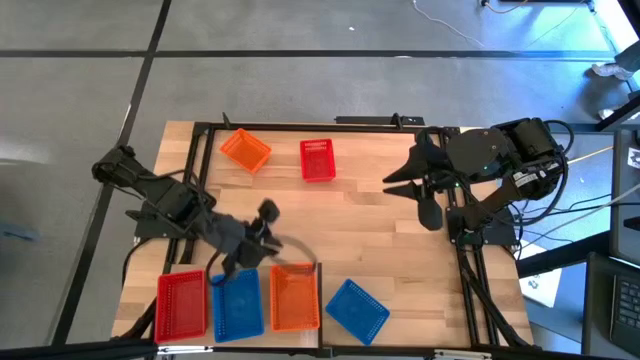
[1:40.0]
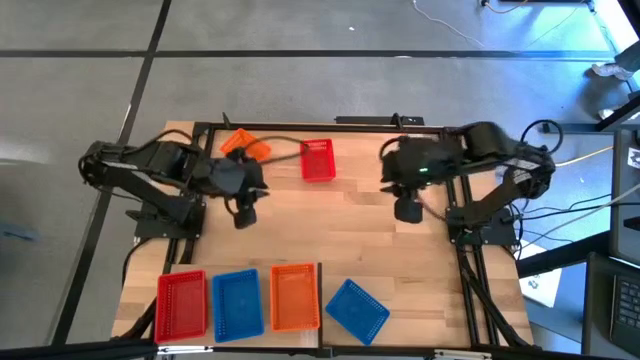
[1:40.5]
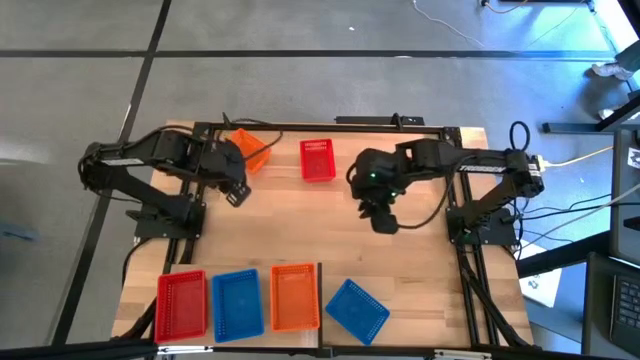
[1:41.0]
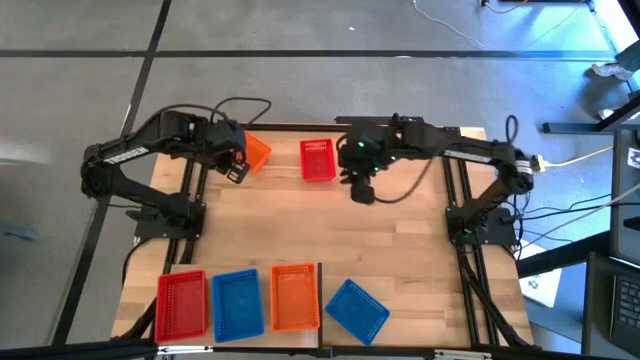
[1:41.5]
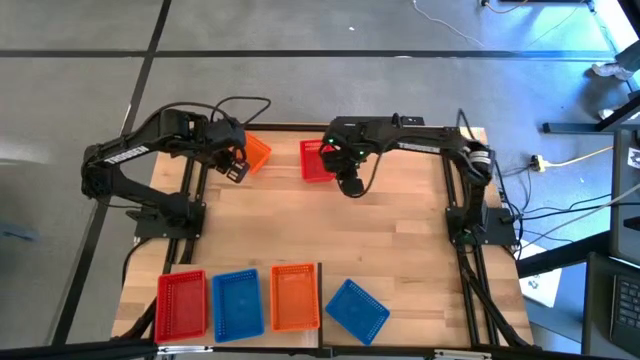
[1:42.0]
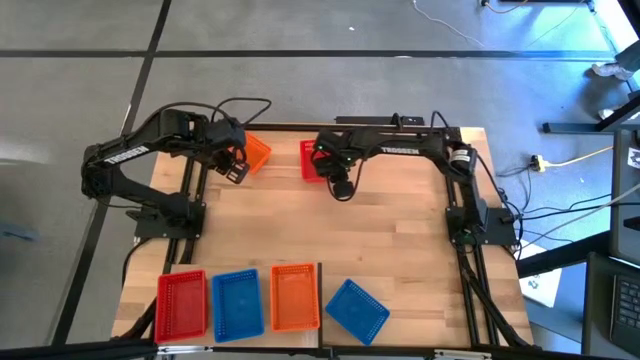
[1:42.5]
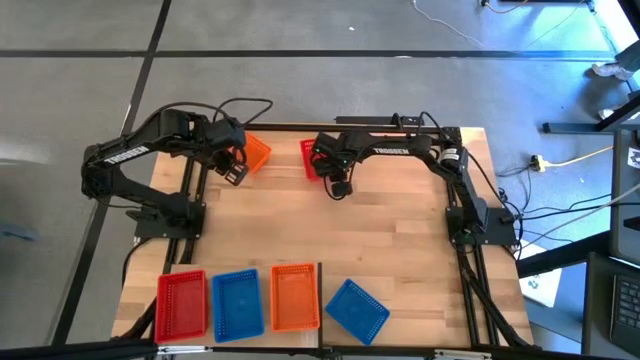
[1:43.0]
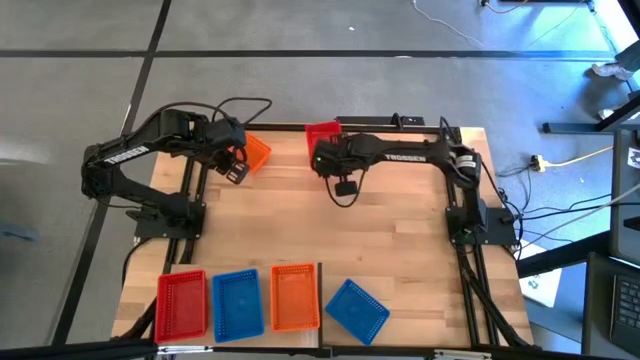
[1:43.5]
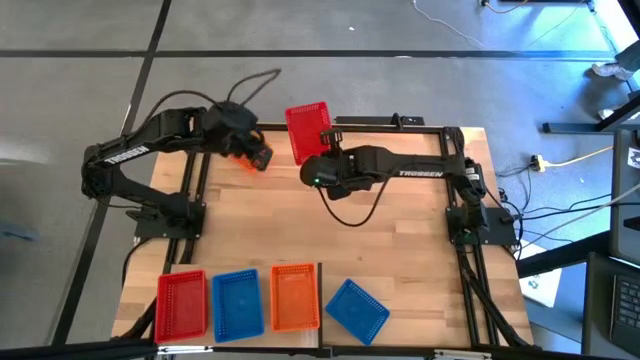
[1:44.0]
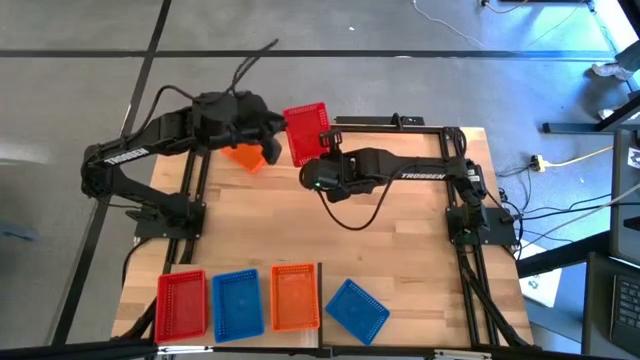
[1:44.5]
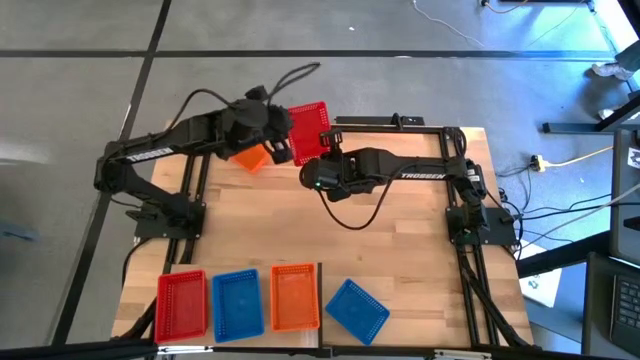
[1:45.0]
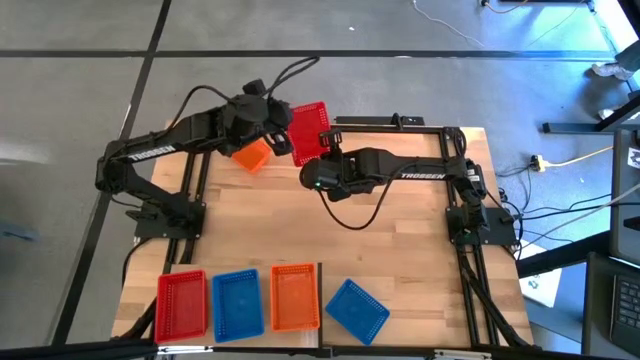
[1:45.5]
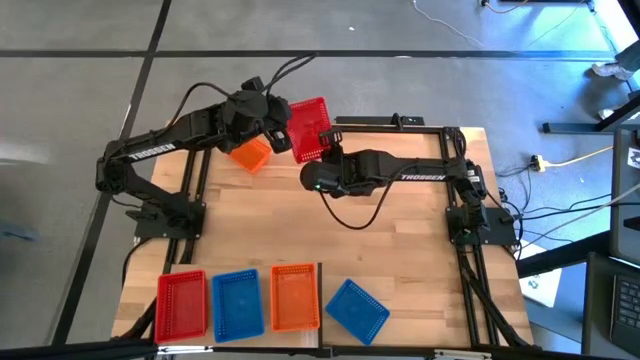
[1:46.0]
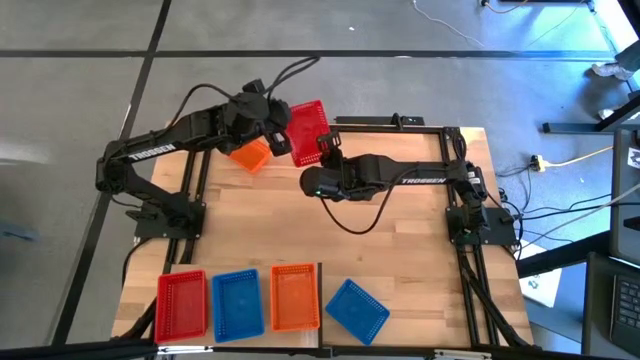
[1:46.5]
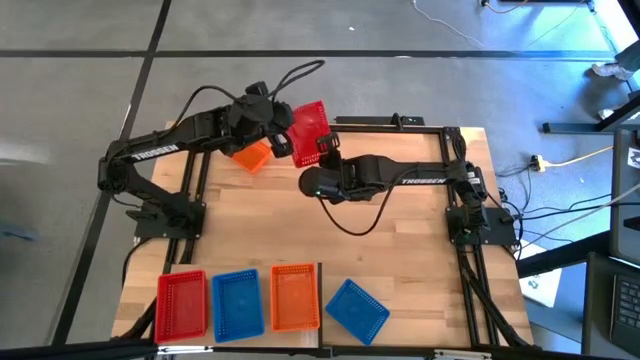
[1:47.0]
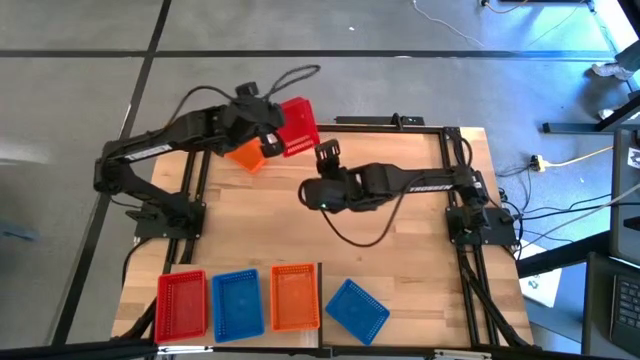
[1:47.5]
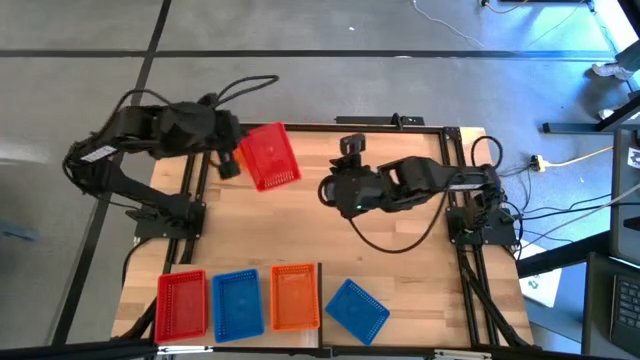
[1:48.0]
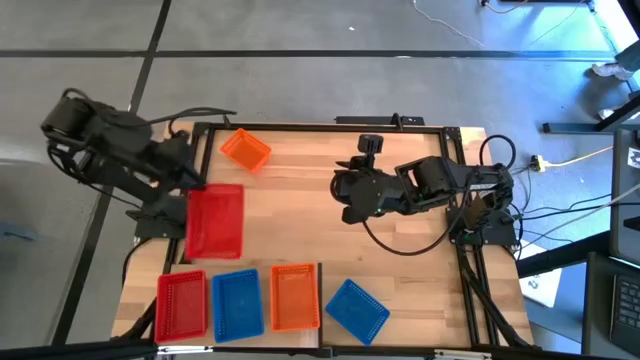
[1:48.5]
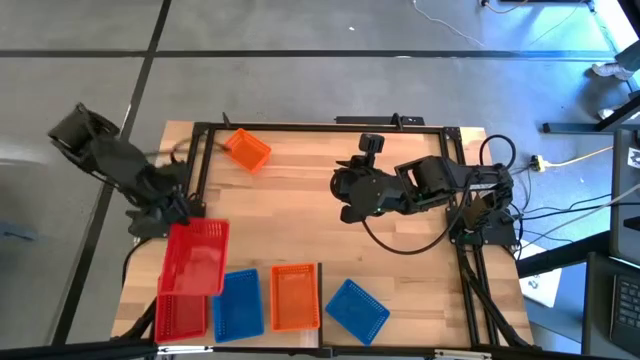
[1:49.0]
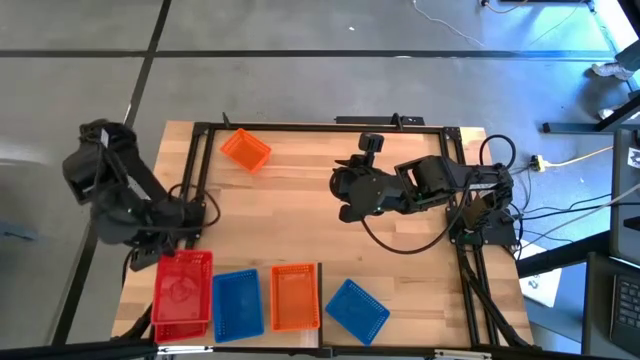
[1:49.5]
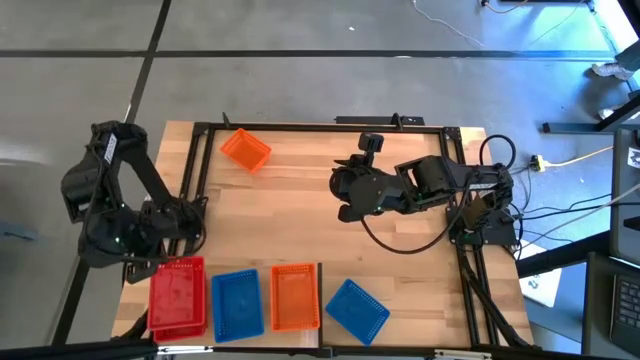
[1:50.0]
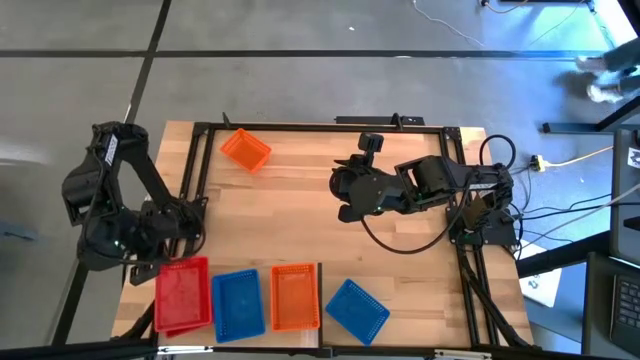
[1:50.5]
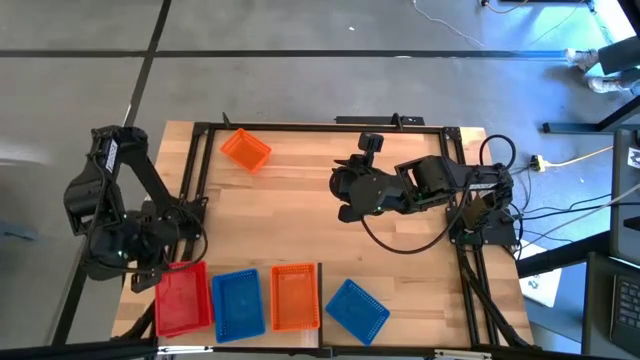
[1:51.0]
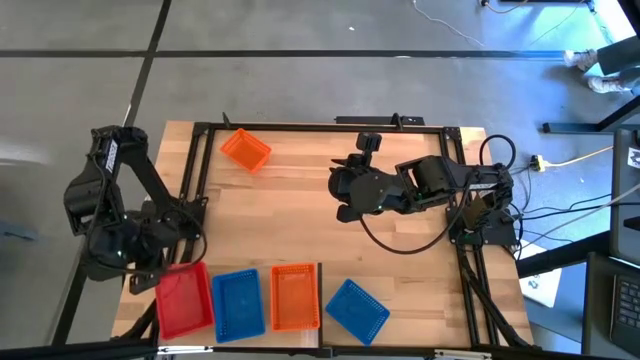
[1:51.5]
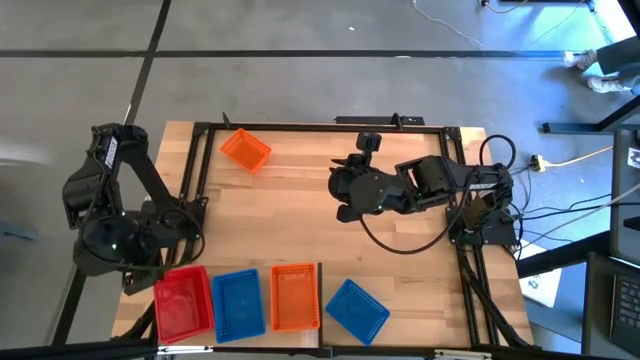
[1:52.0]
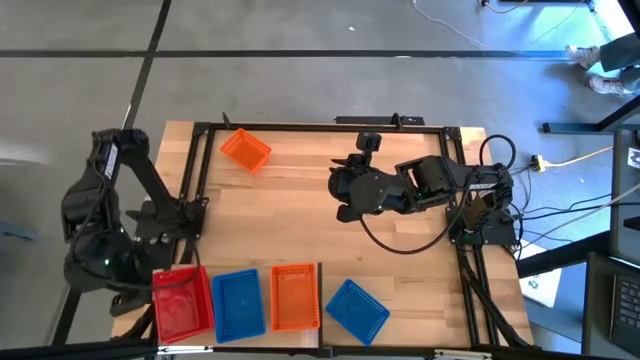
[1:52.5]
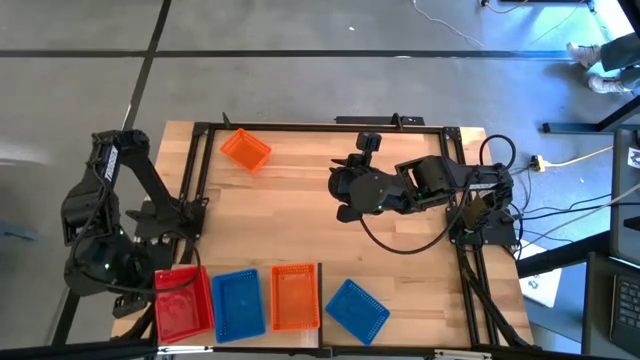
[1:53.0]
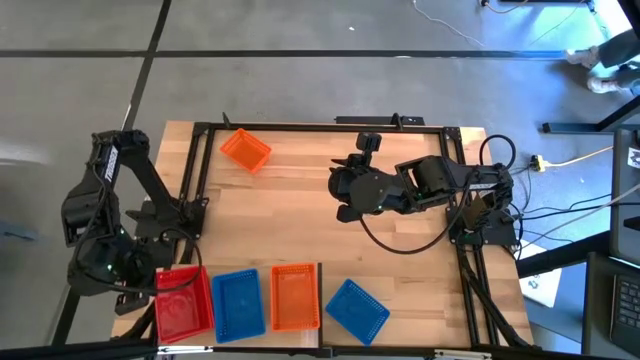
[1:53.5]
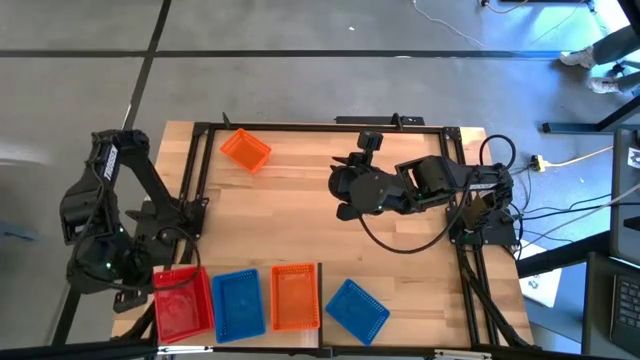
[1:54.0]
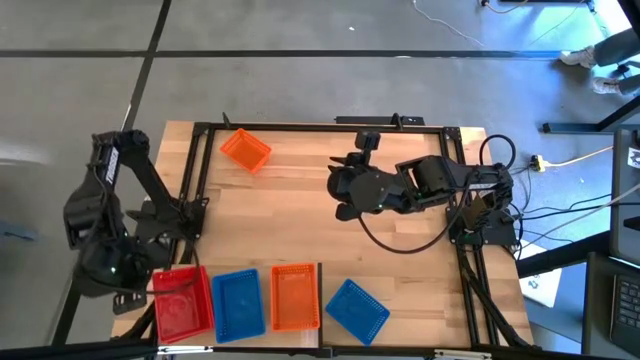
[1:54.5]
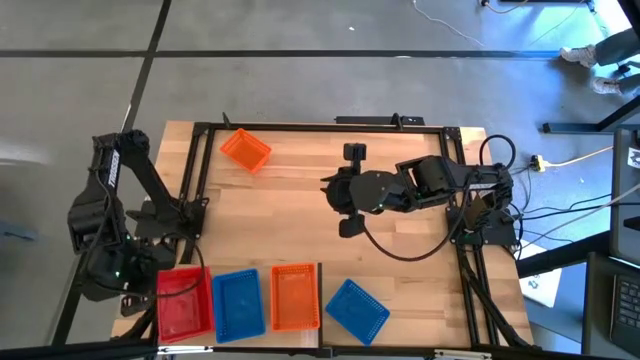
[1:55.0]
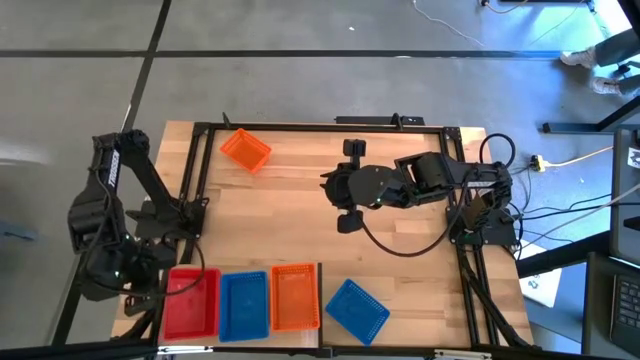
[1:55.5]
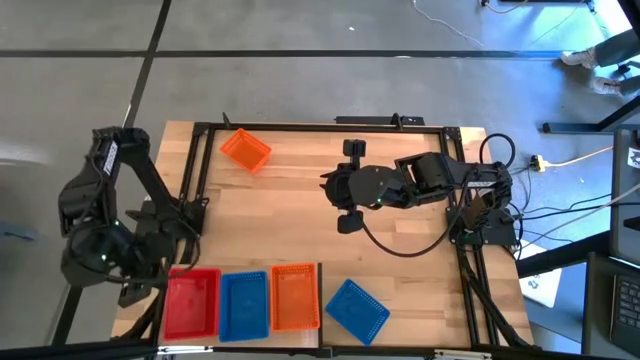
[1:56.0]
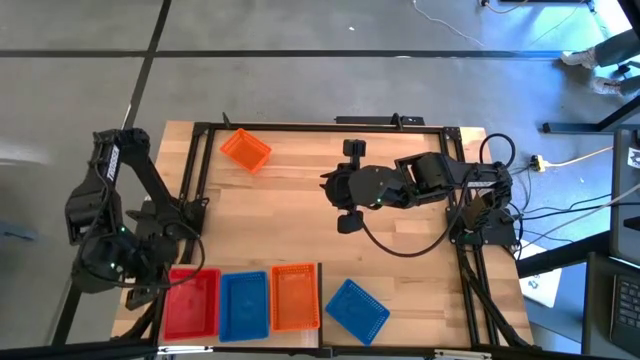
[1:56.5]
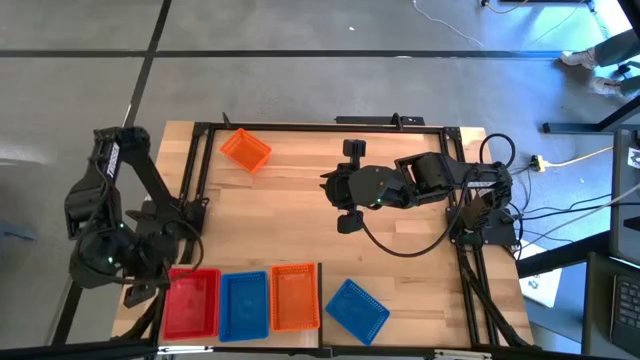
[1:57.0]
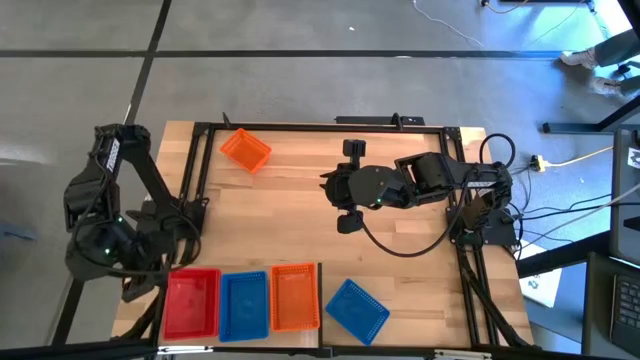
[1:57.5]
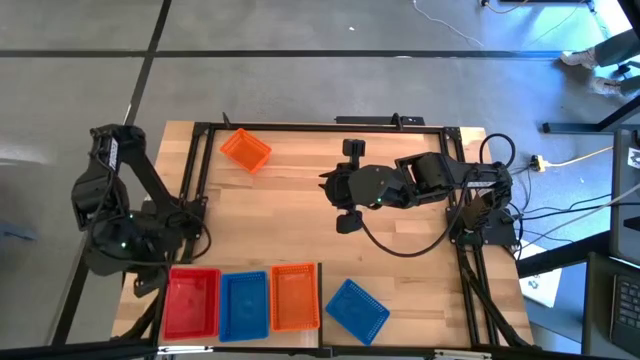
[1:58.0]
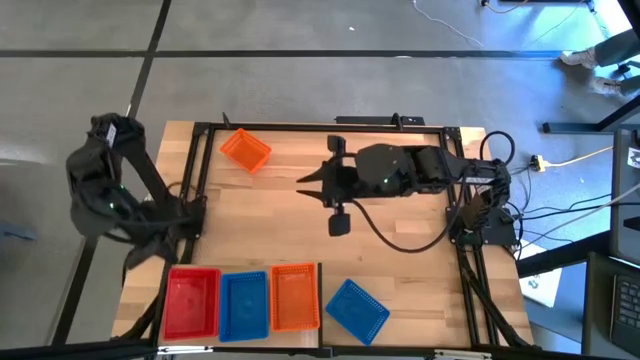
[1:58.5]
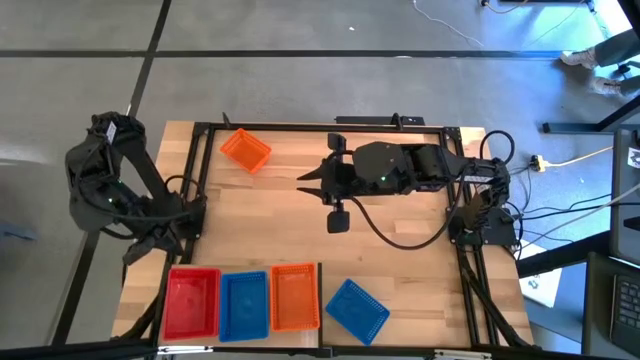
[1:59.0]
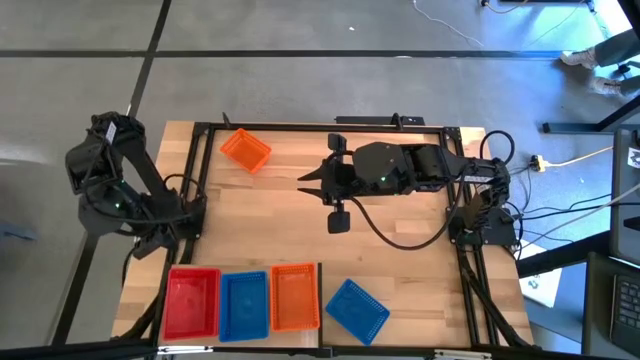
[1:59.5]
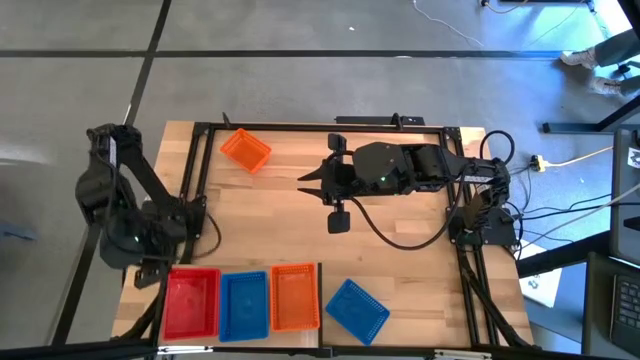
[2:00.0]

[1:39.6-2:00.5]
Task: Stack baskets on shelf by color
Stack the red bin on top of the other red bin on the shelf

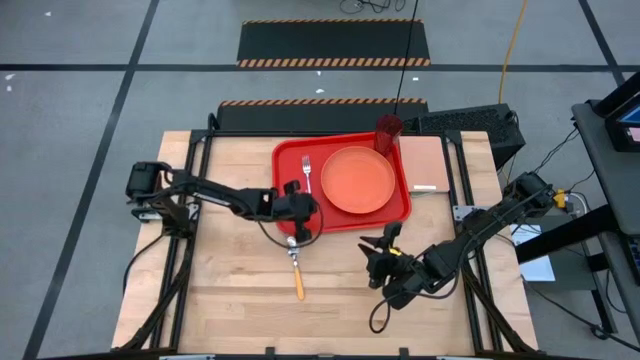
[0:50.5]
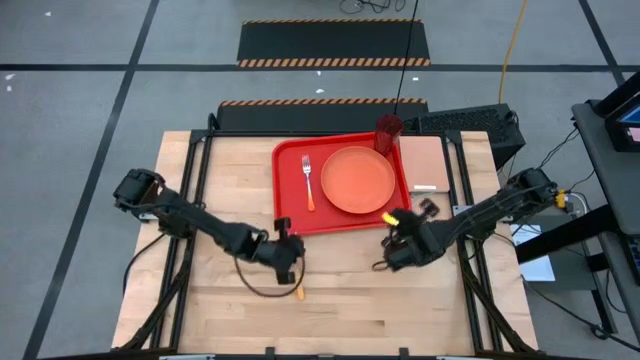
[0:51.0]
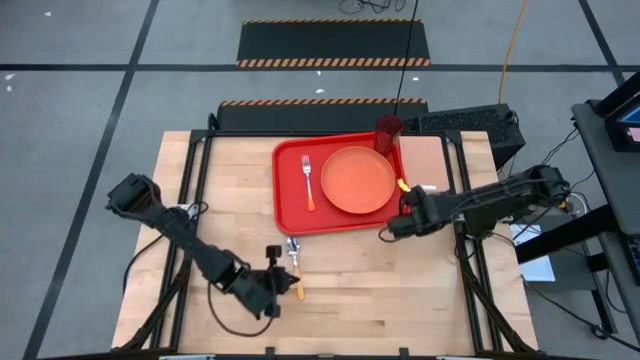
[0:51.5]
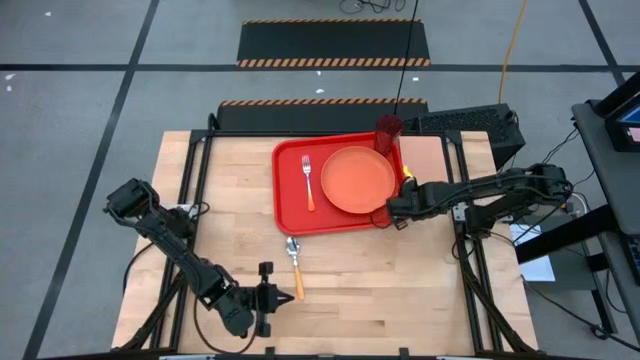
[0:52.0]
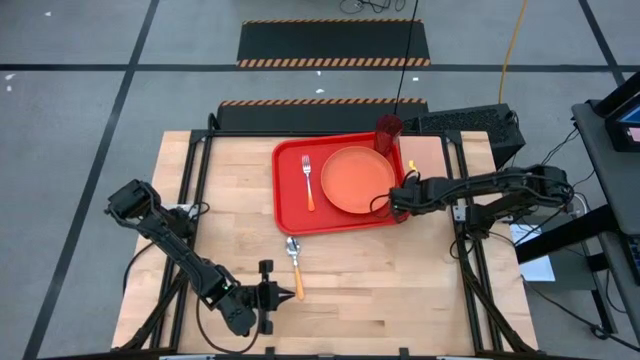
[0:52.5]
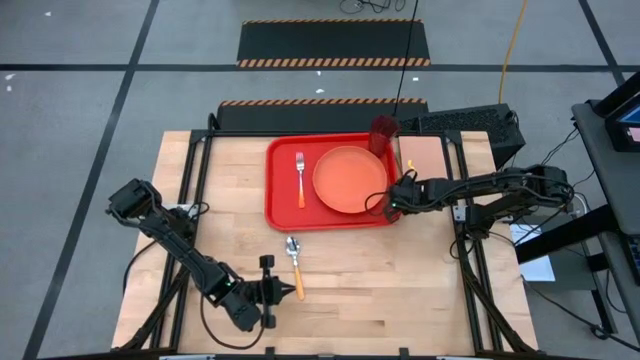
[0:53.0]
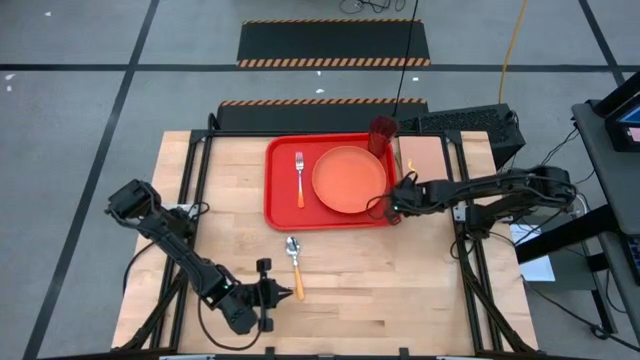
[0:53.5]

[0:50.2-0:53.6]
Task: Pick and place plate/cup/fork/spoon on tray
Adjust the red serving tray
